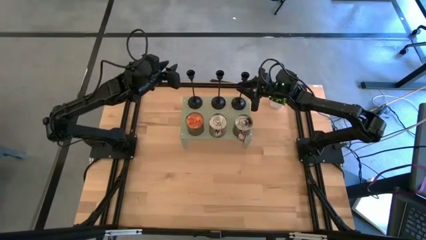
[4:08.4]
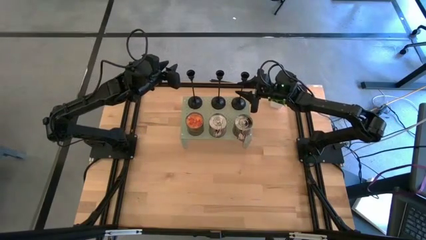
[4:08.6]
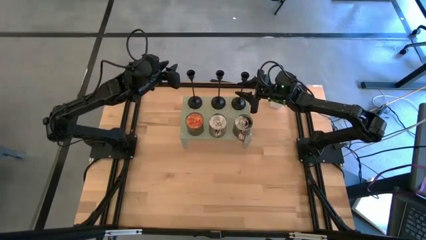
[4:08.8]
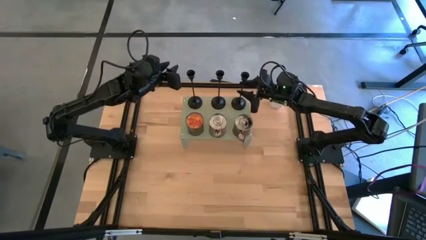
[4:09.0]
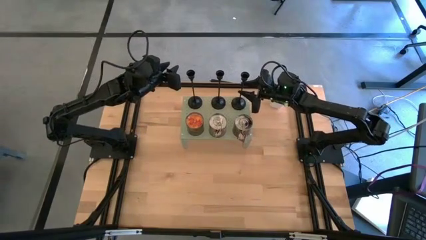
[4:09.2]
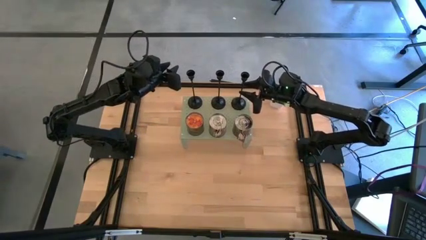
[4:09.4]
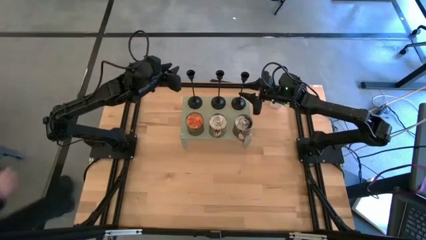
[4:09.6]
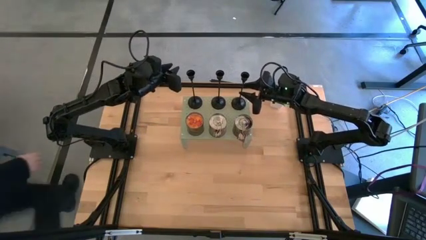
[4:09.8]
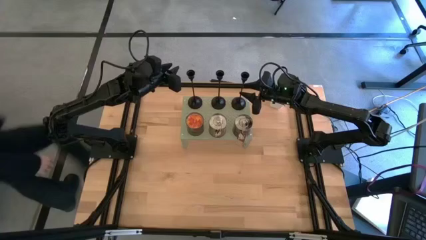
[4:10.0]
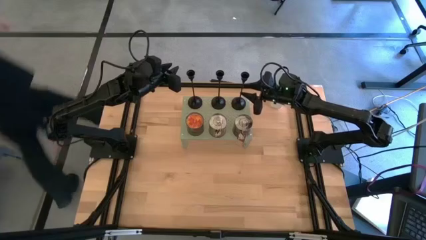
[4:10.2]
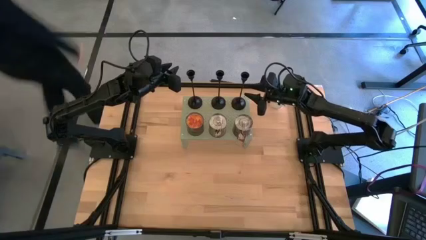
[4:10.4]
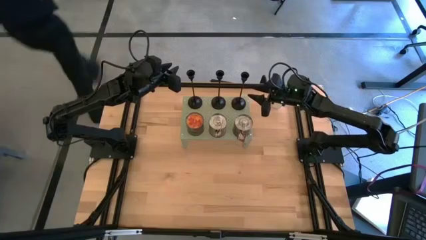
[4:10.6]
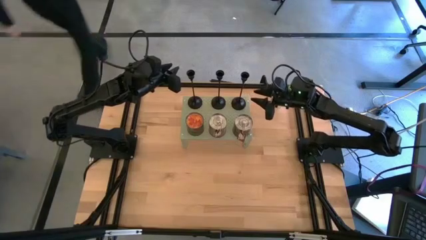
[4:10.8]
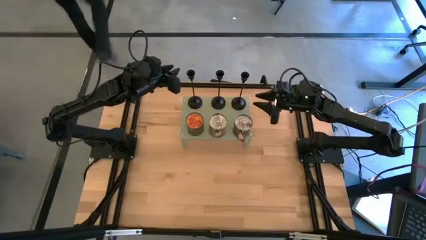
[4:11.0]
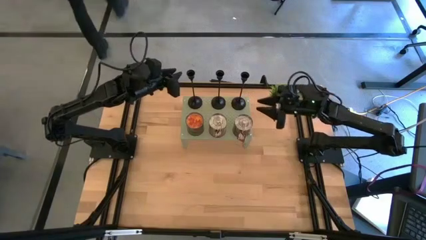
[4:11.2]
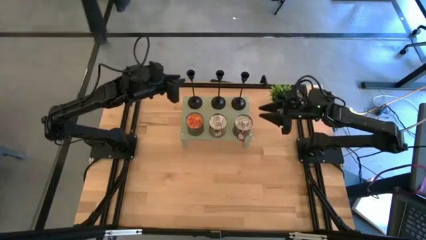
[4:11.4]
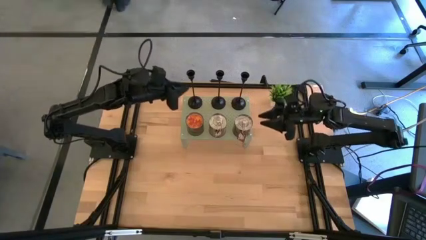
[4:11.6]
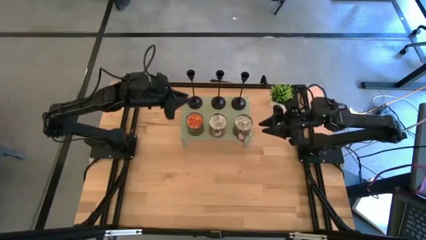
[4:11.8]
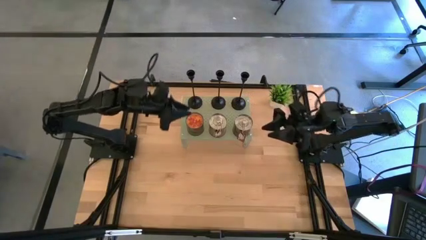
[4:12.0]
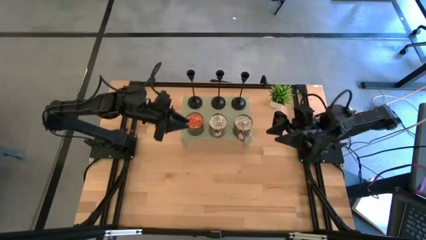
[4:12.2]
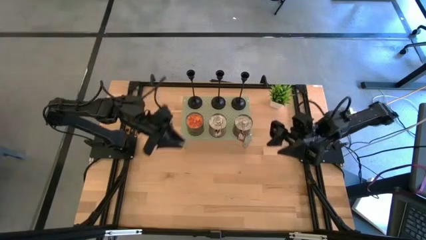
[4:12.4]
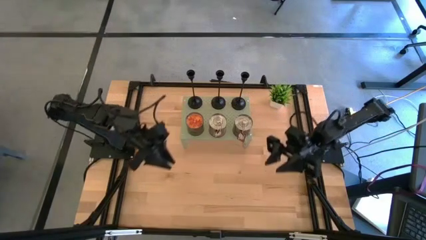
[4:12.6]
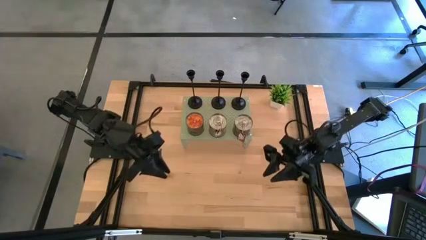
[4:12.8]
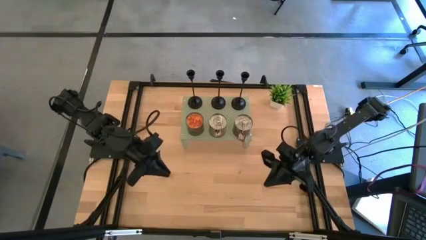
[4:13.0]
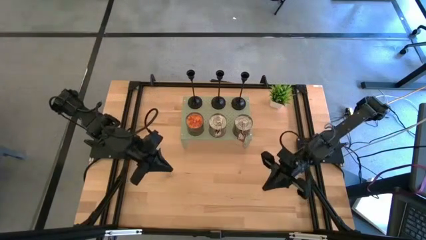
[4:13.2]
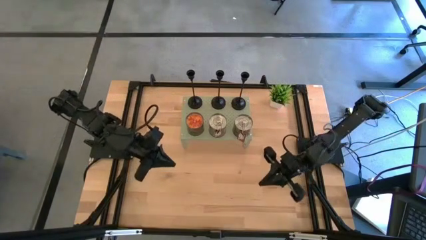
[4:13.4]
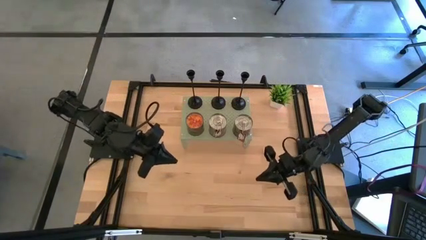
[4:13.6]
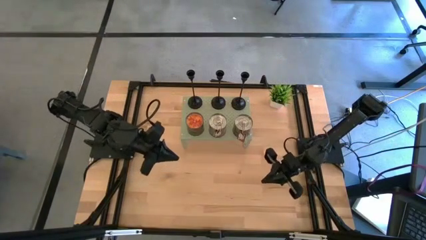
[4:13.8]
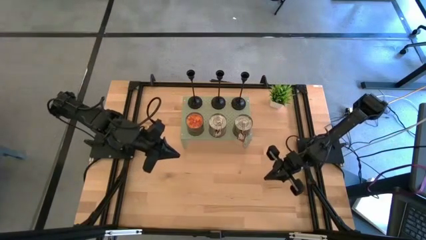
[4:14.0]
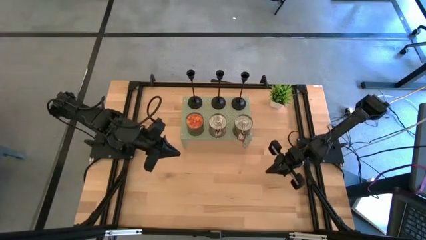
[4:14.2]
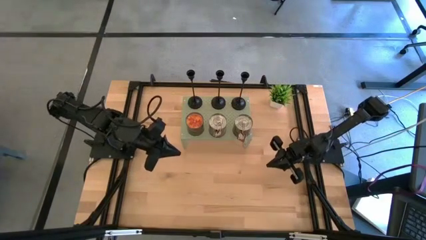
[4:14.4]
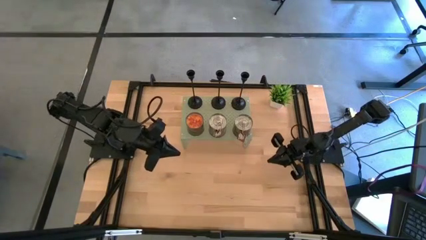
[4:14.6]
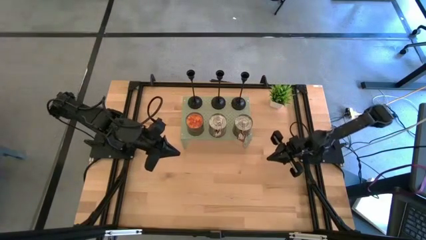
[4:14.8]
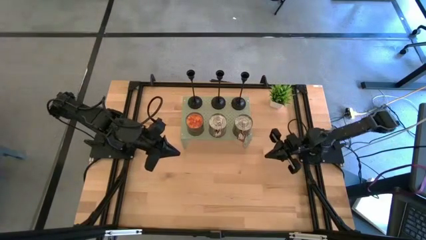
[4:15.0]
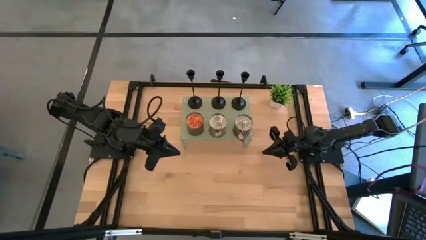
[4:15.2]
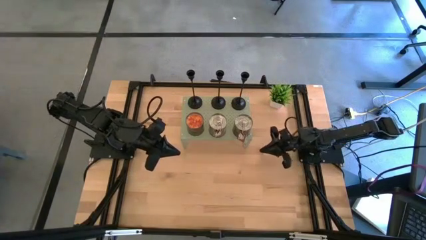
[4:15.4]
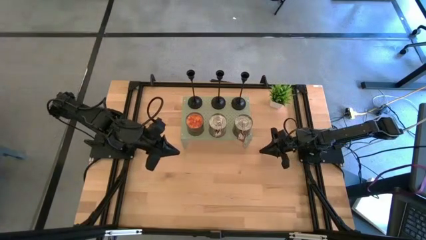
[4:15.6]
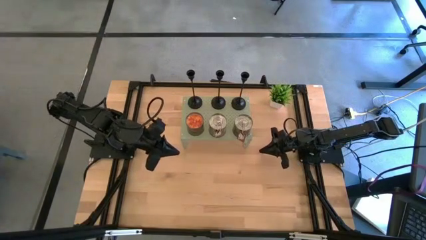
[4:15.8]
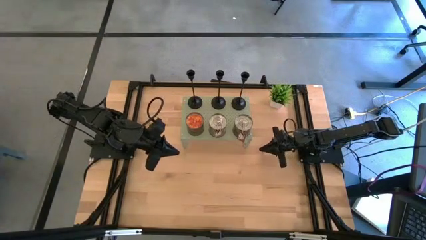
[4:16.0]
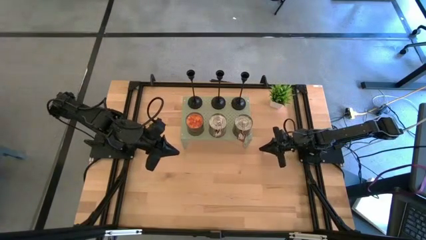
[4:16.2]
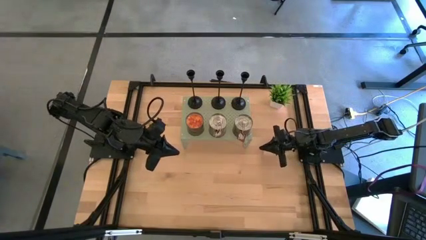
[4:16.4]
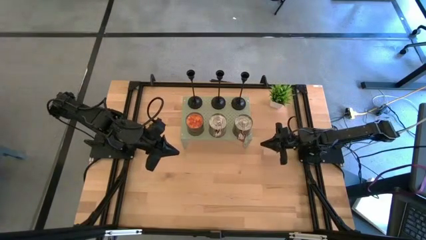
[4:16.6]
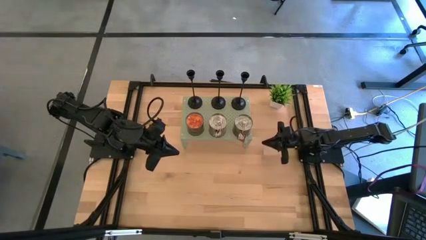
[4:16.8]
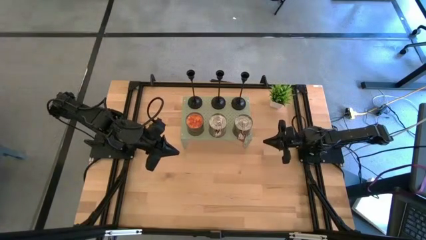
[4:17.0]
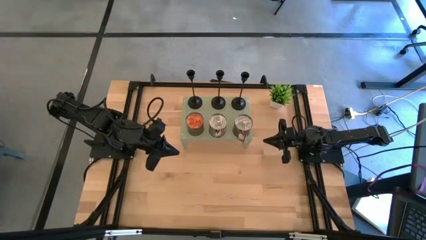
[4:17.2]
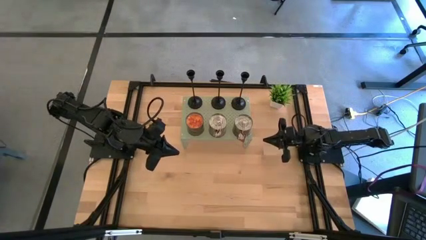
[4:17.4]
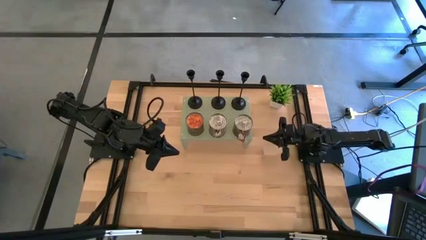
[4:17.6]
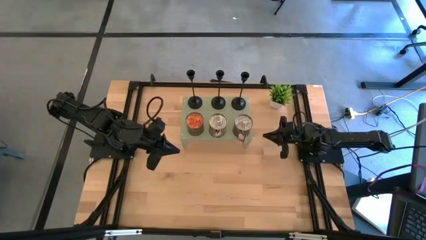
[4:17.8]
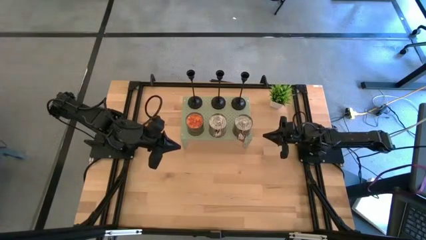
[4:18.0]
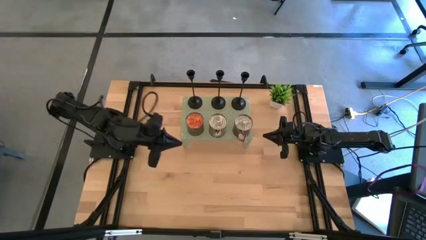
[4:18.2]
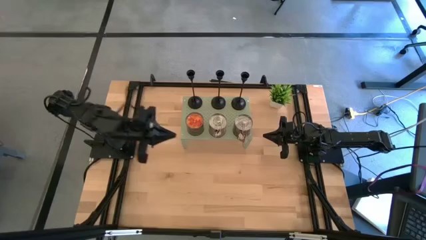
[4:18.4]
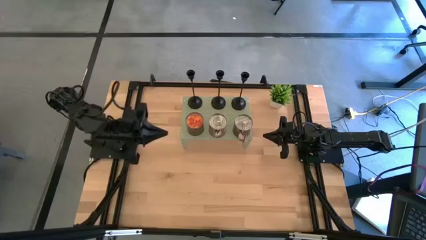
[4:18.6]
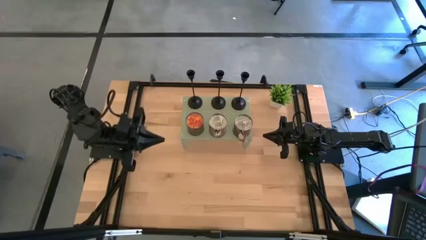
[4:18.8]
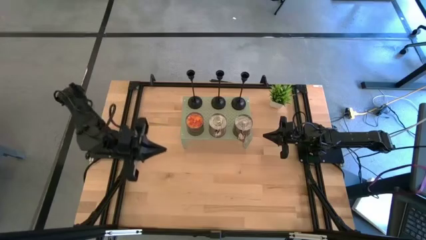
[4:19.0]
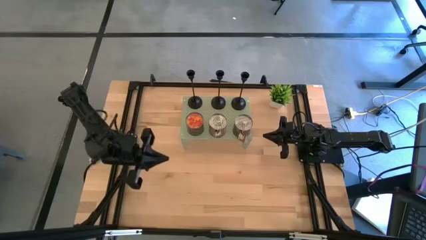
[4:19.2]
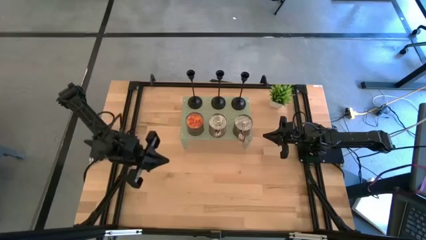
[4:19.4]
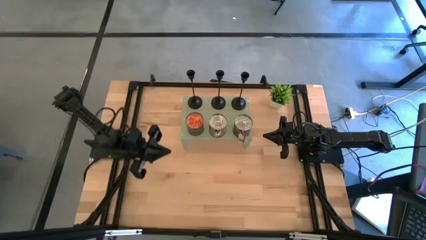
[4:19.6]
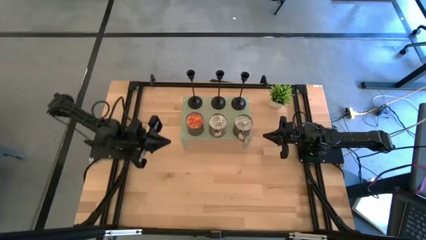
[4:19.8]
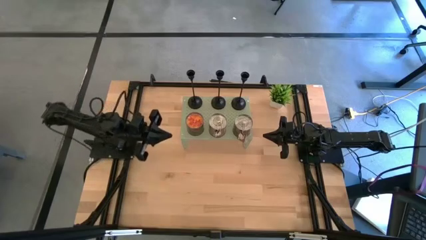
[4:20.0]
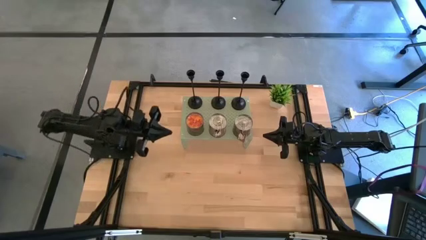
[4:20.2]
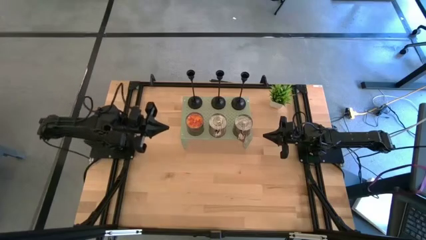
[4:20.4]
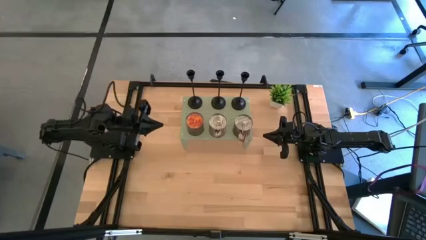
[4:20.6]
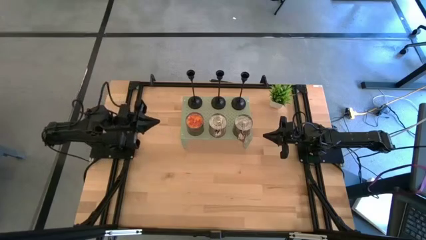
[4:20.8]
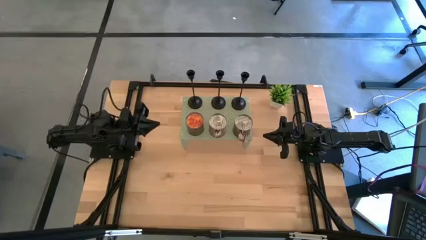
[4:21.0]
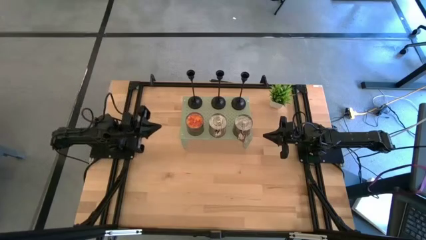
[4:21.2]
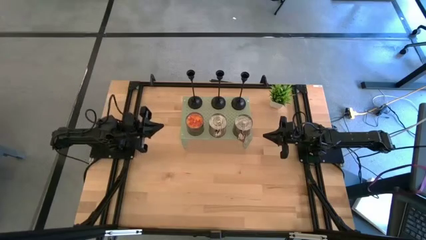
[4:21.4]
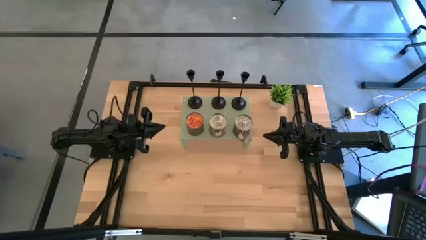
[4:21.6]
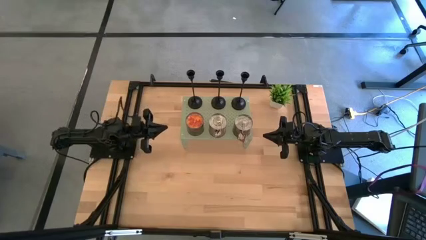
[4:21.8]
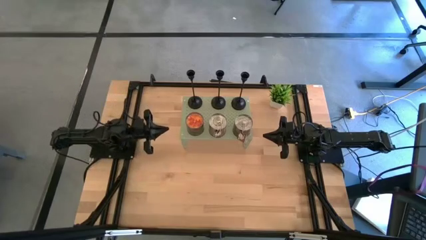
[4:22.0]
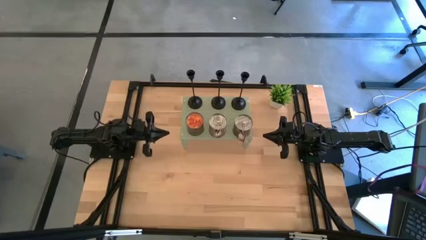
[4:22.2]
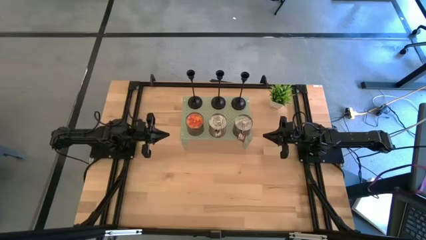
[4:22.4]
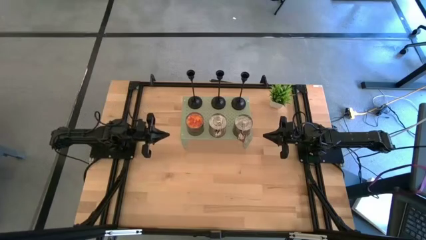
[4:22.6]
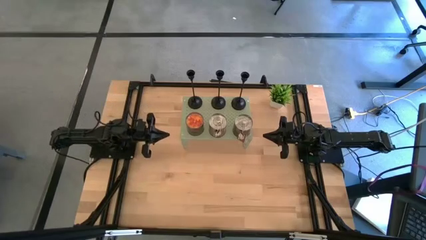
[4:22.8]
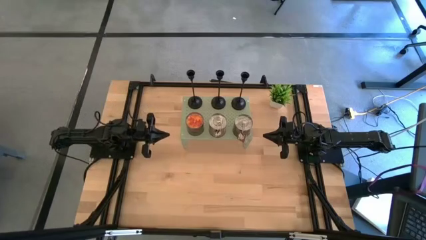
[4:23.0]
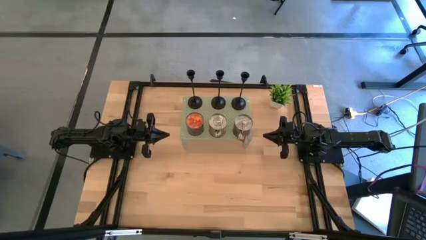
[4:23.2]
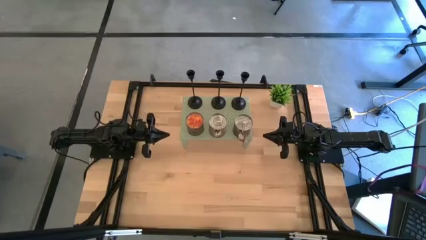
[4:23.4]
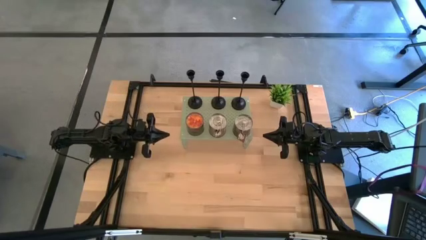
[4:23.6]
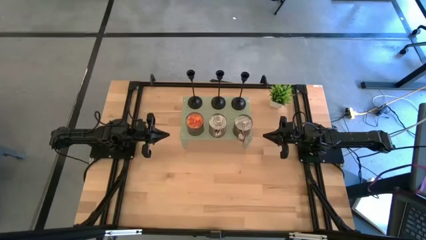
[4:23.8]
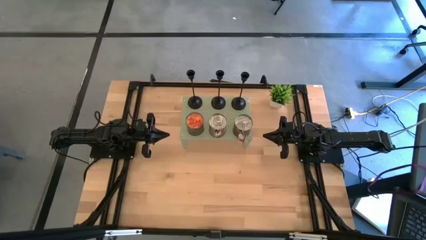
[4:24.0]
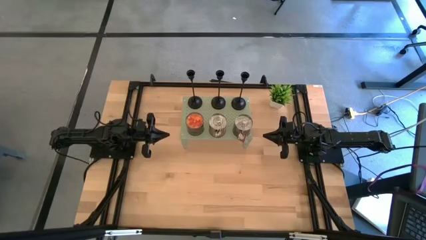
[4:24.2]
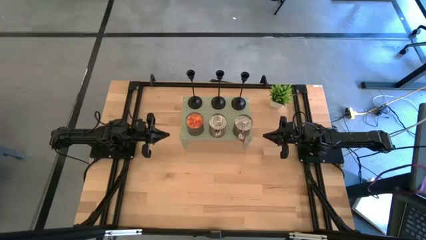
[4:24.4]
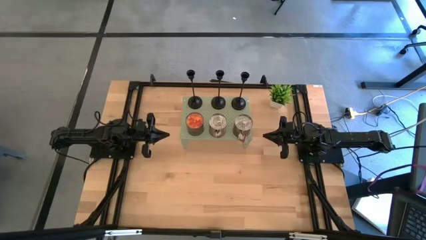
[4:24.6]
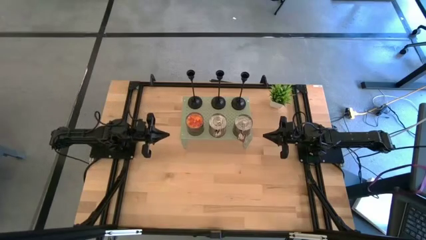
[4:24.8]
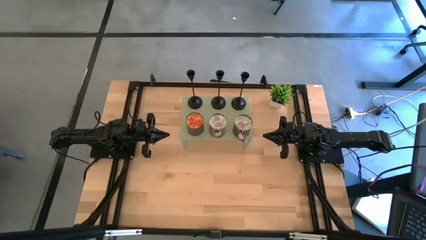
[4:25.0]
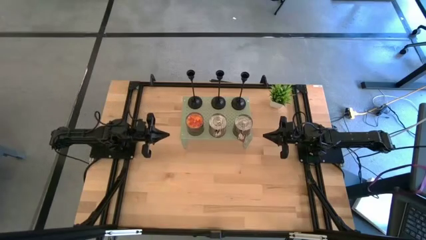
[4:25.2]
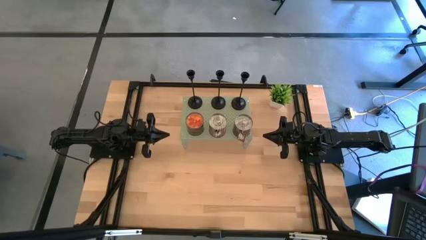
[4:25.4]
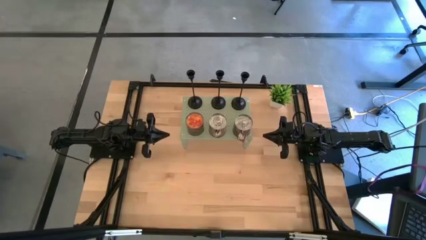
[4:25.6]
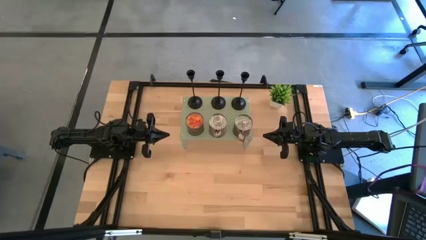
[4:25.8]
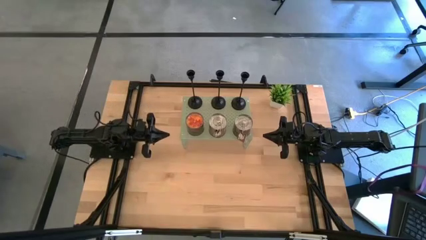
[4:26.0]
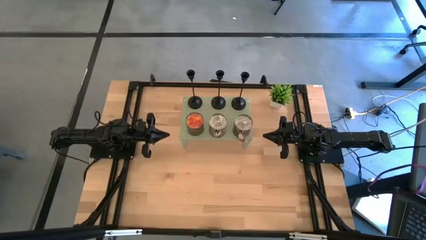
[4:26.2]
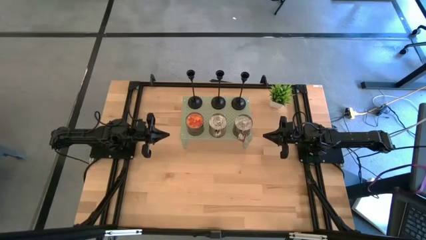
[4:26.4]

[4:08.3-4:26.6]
Task: Pick & Place candle stick holders
Return to Home Position
